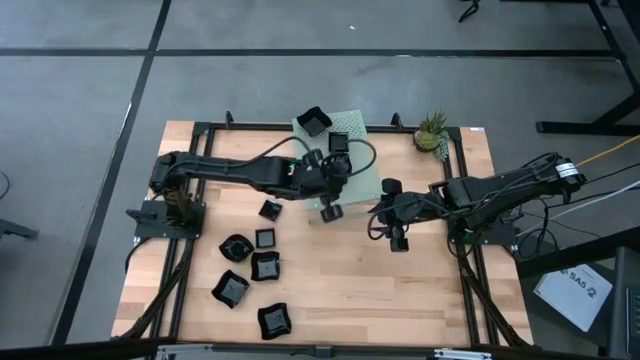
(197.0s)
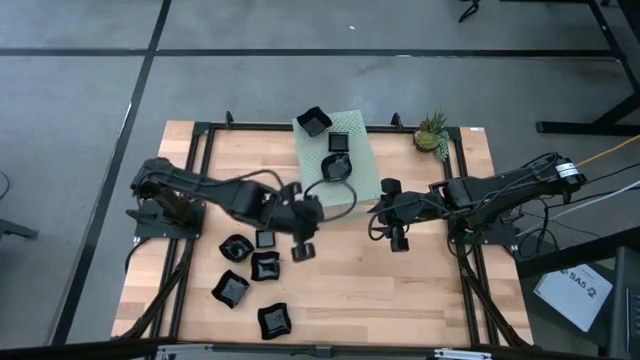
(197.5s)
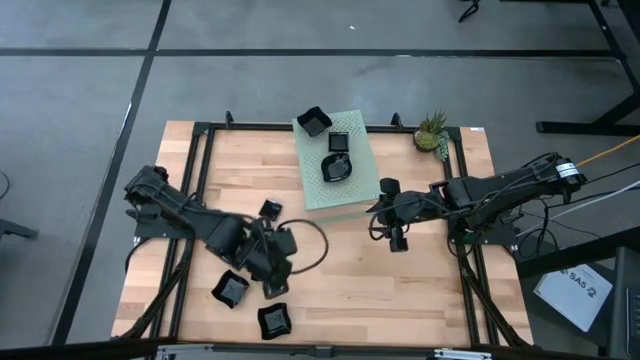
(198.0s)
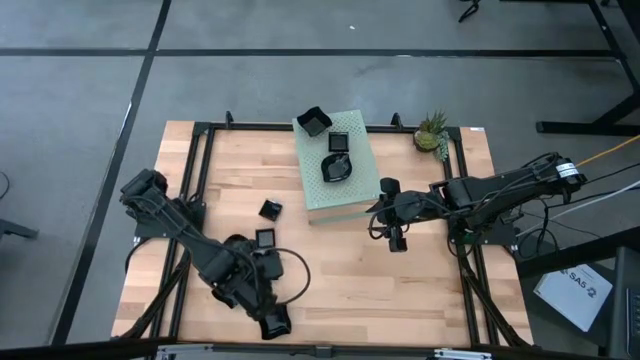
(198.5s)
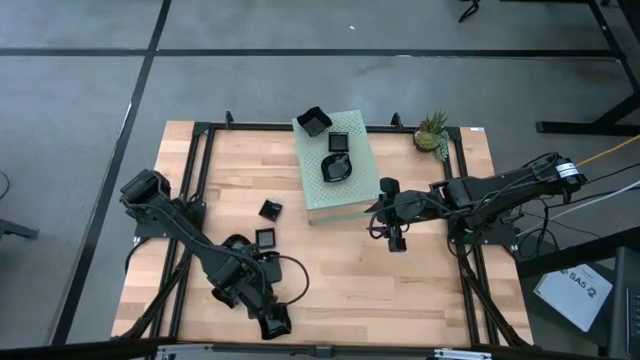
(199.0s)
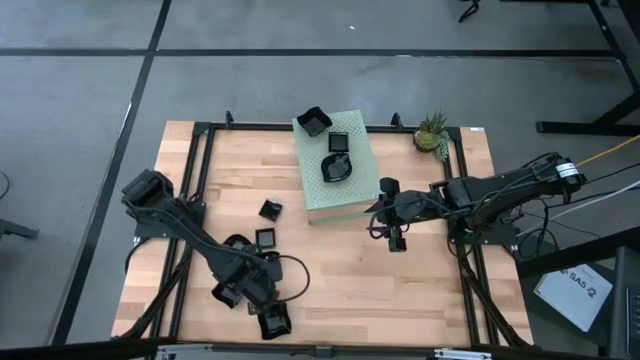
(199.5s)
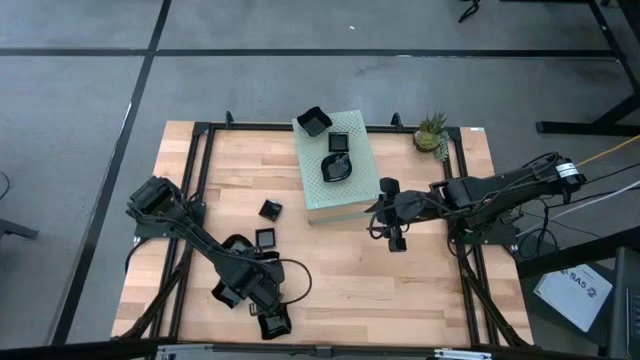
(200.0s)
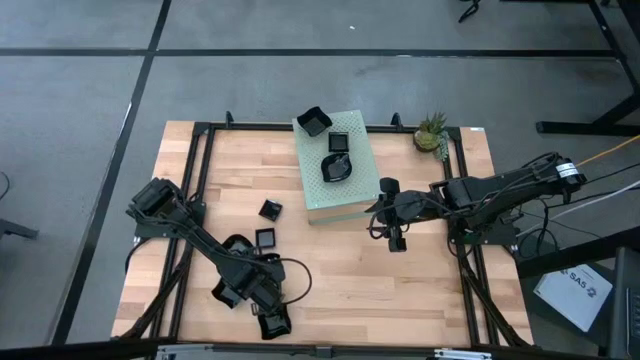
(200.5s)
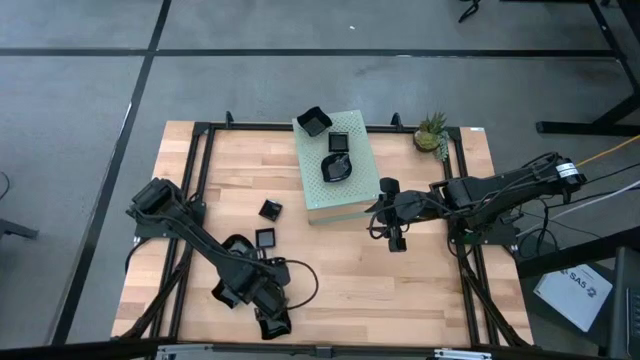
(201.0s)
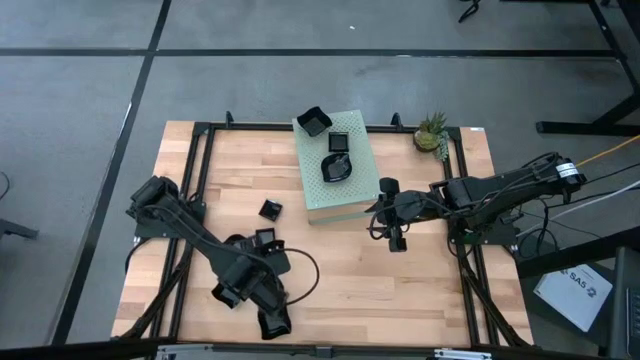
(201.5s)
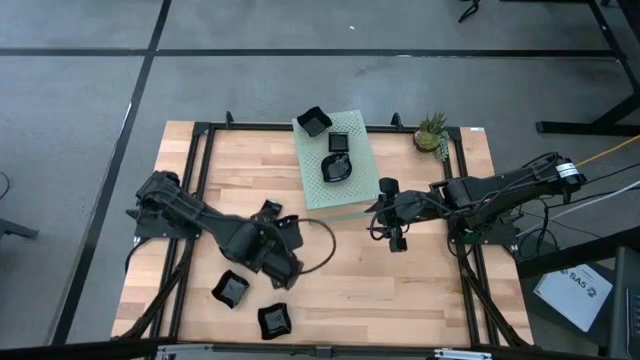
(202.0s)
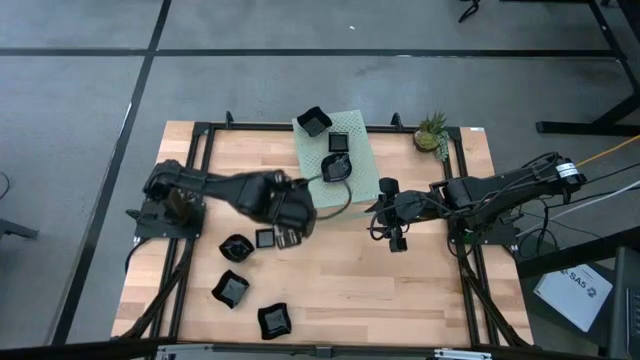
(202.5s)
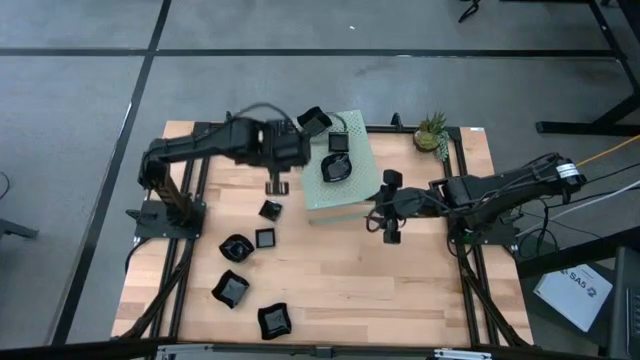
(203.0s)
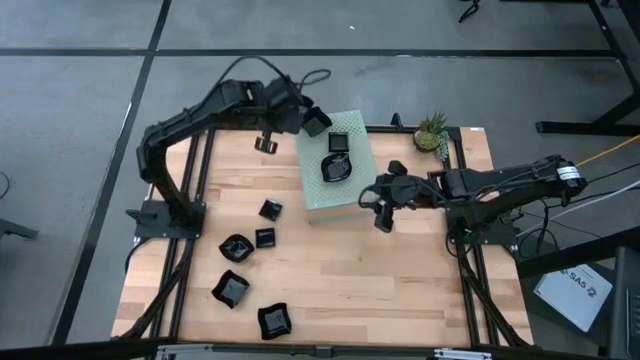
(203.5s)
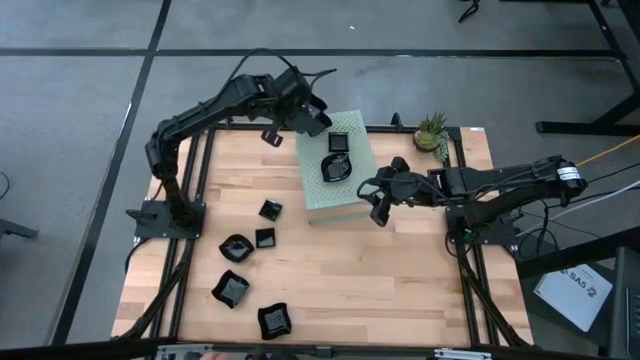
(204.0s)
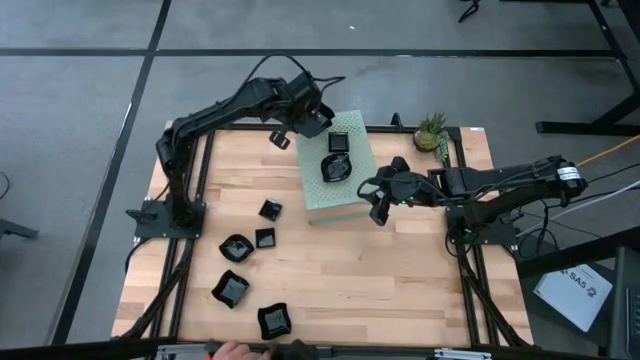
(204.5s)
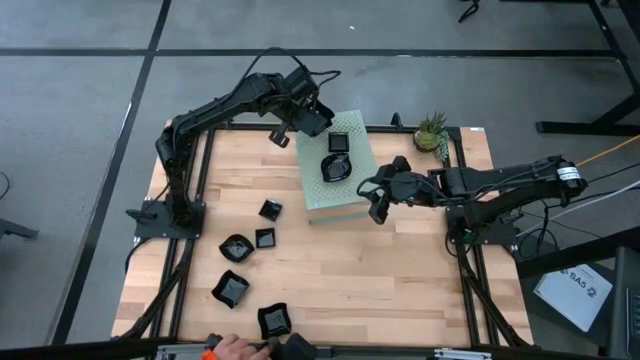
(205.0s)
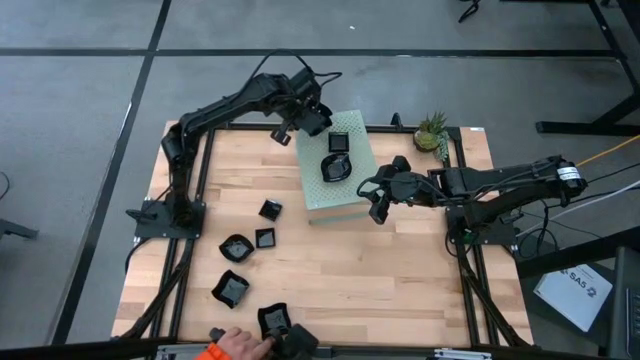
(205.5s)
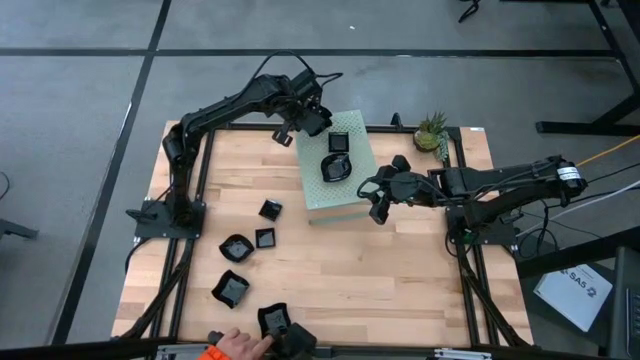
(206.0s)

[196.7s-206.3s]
Task: Pick & Place Mini shaped plates
Stack the black distorted square plate on top of the black distorted square plates on the shelf

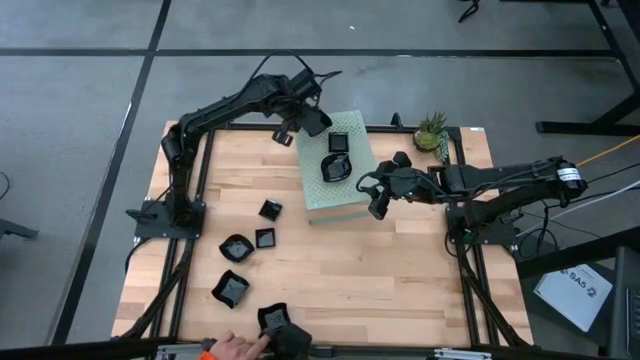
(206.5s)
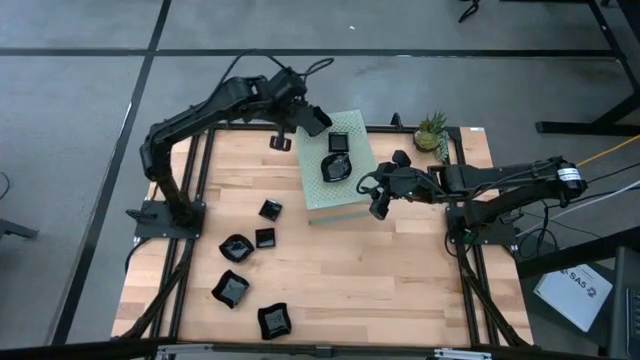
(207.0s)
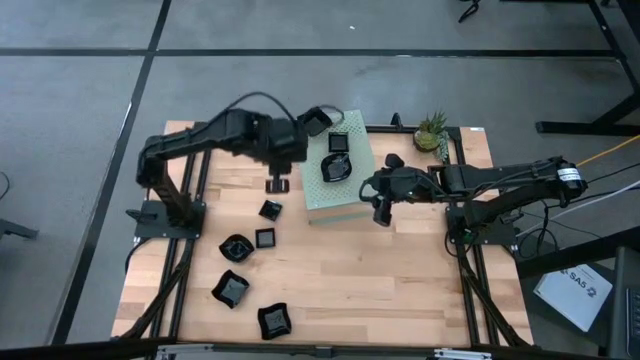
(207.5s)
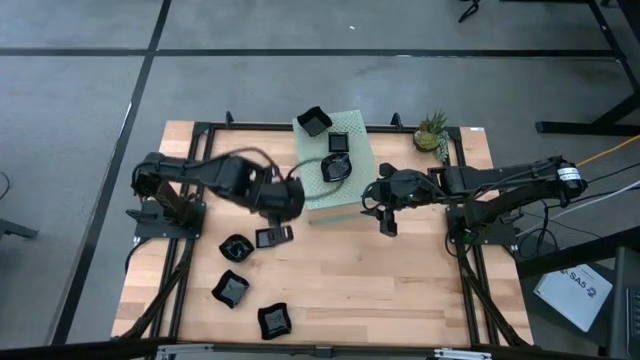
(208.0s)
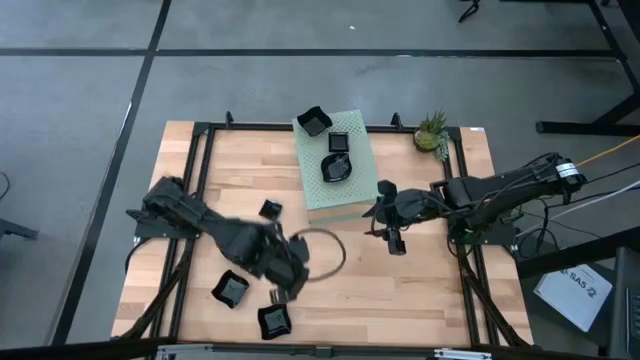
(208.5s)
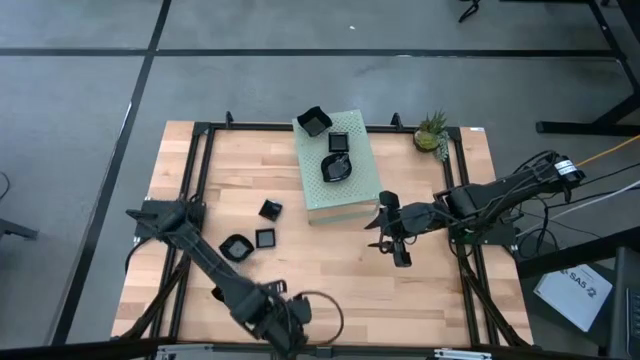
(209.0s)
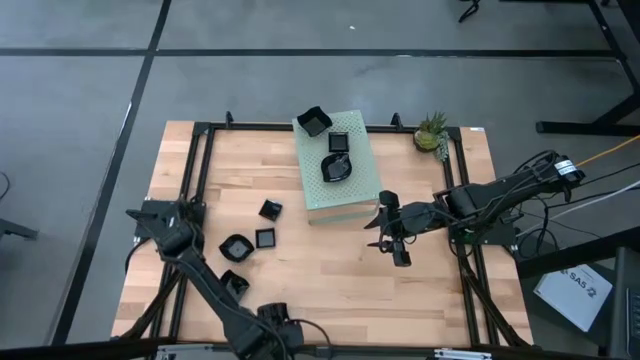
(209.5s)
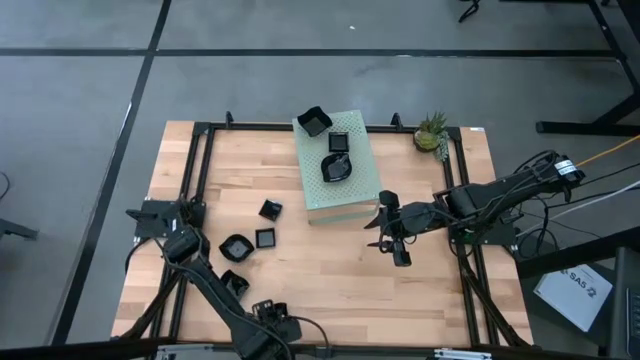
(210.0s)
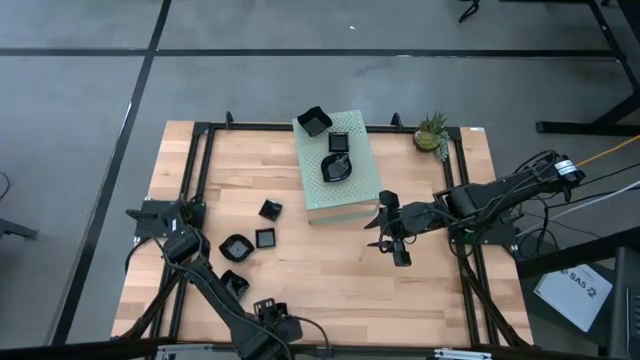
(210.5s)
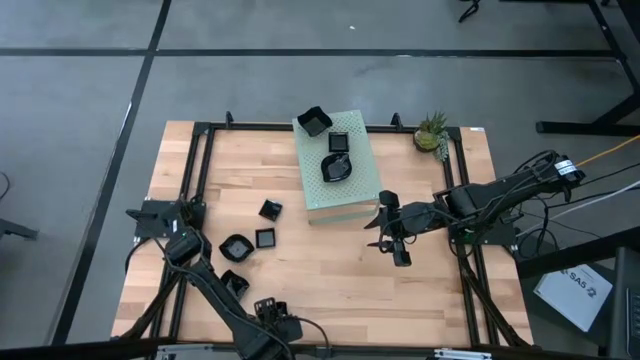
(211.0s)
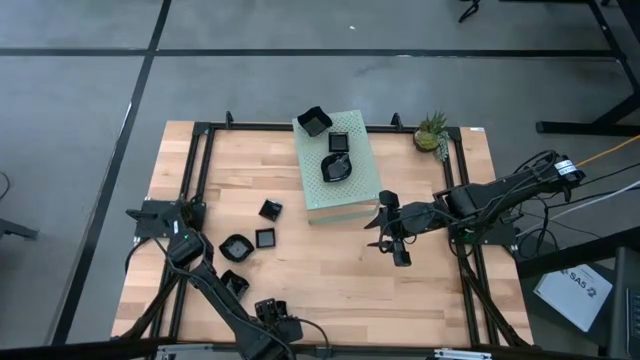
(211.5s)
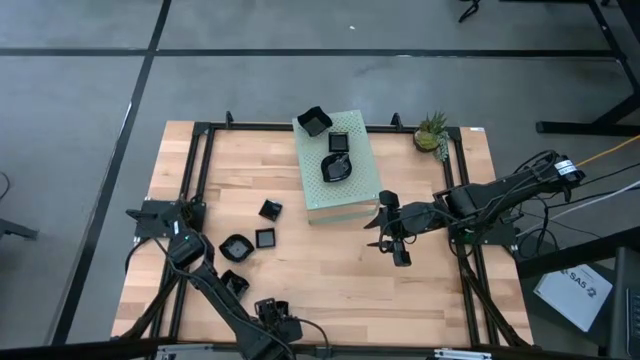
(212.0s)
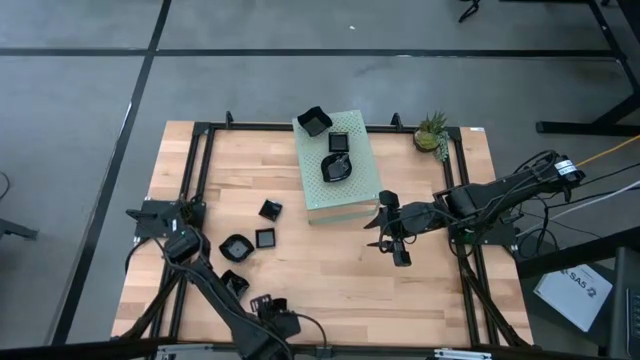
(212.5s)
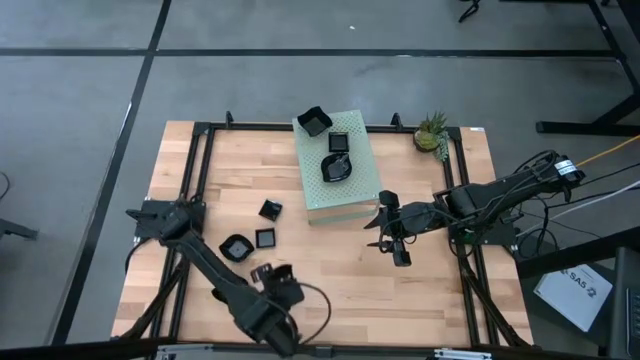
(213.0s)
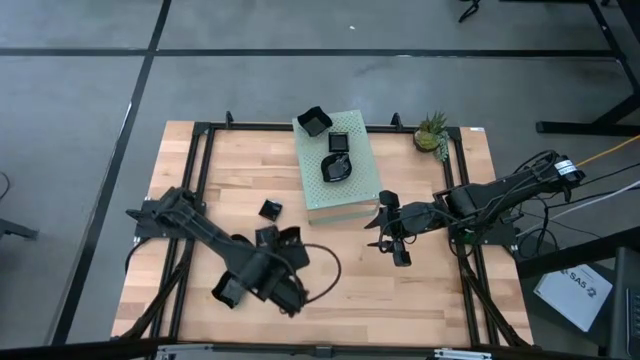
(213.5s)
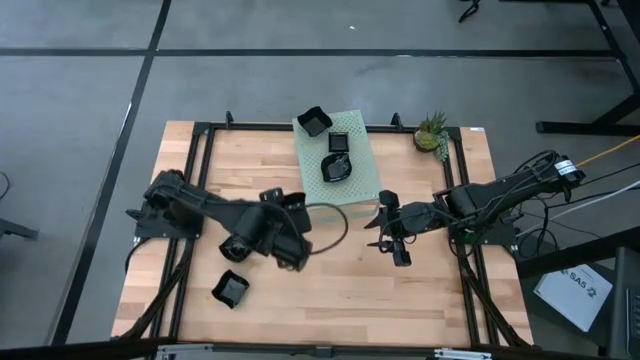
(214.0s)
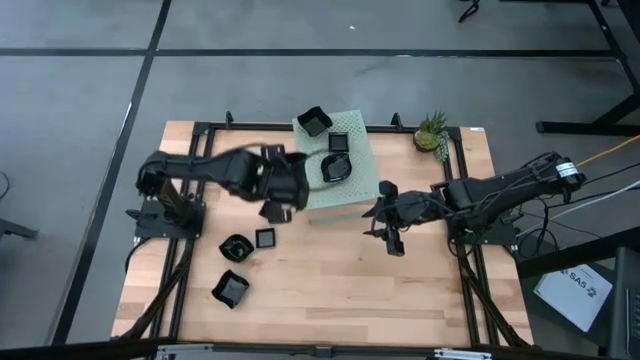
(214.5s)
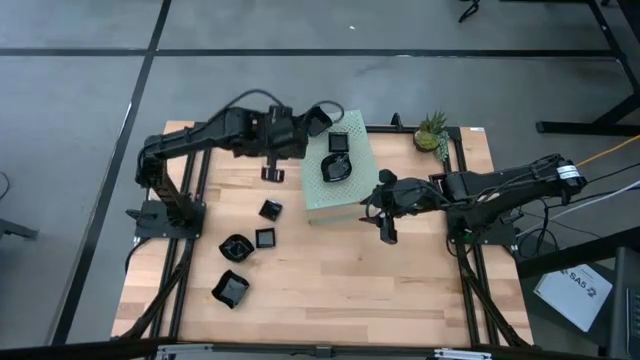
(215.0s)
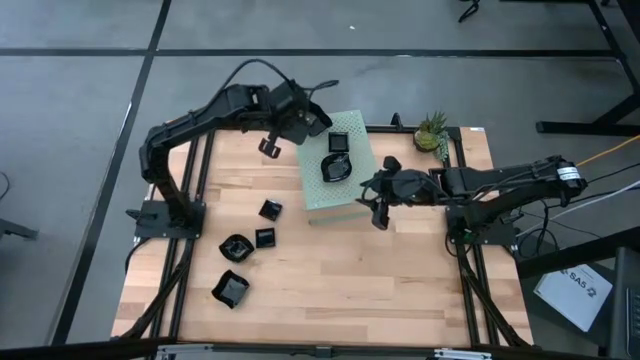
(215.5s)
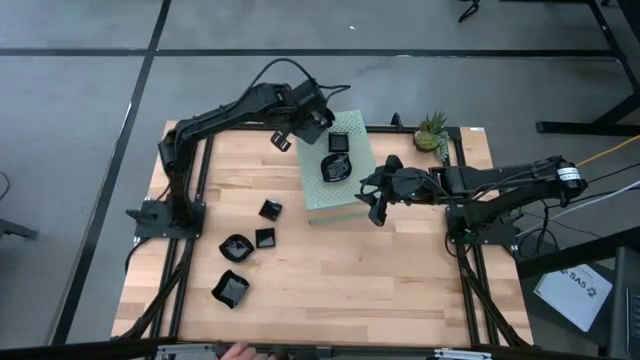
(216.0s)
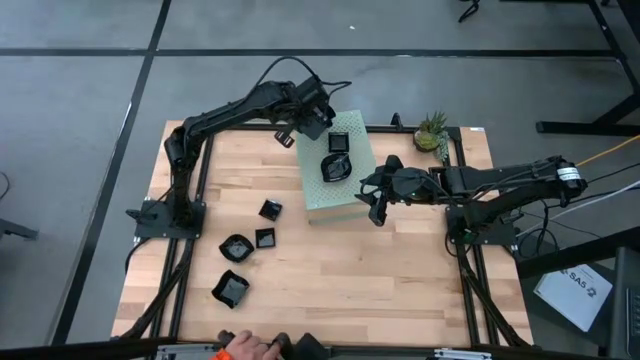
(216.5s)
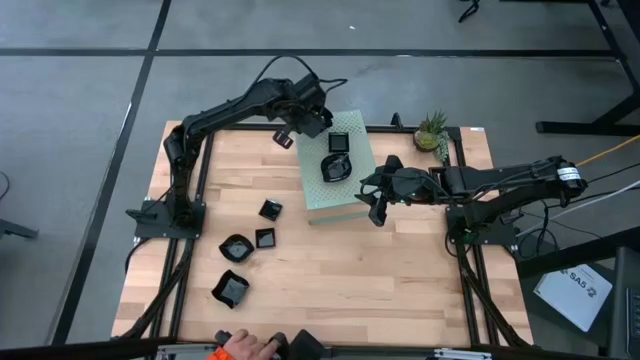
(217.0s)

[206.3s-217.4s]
Stack the black distorted square plate on top of the black distorted square plates on the shelf
